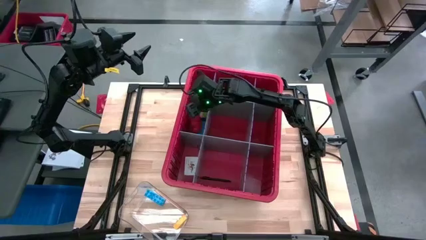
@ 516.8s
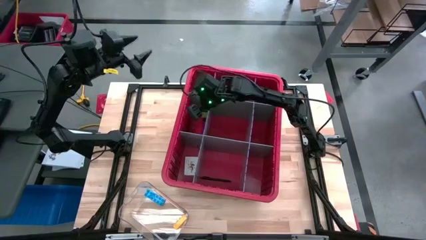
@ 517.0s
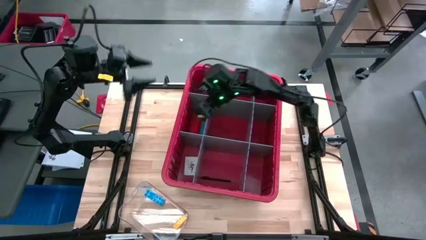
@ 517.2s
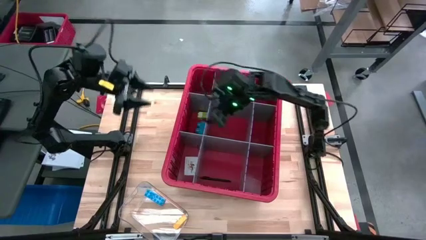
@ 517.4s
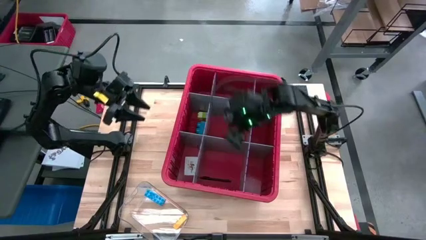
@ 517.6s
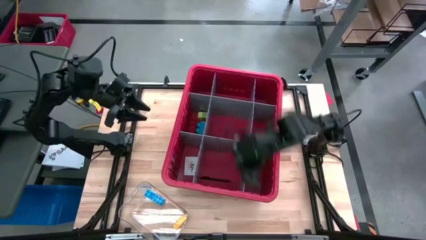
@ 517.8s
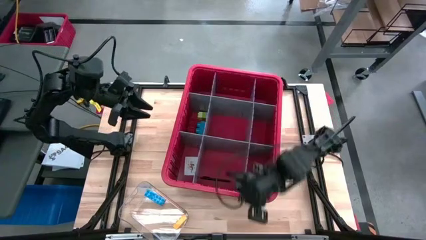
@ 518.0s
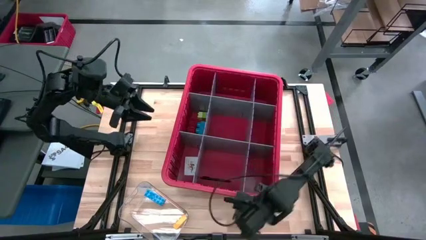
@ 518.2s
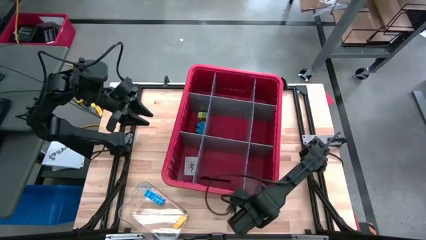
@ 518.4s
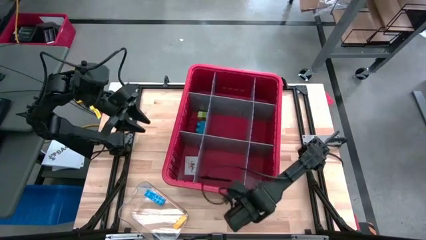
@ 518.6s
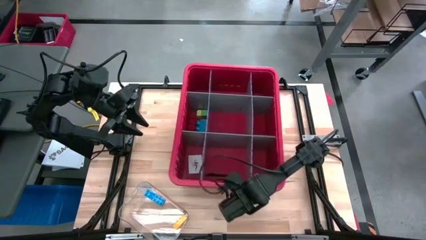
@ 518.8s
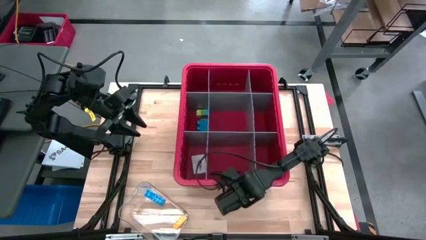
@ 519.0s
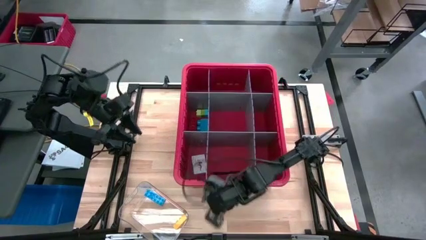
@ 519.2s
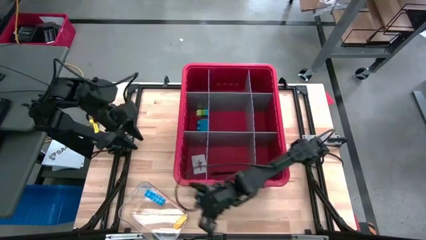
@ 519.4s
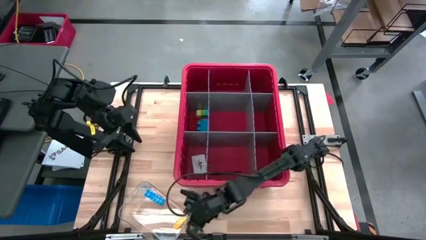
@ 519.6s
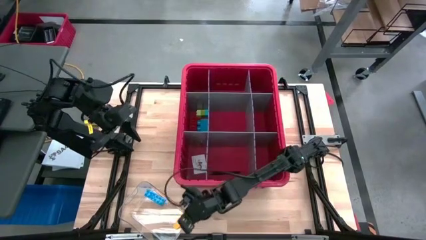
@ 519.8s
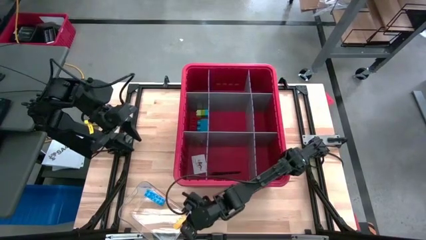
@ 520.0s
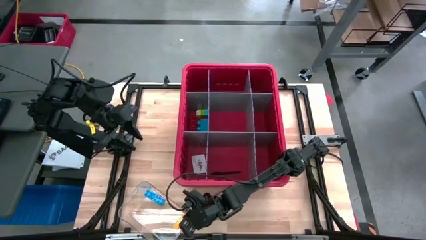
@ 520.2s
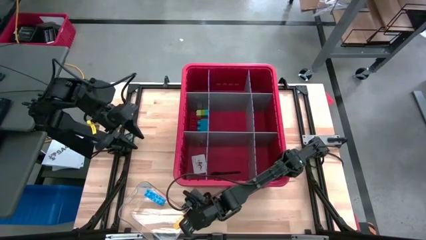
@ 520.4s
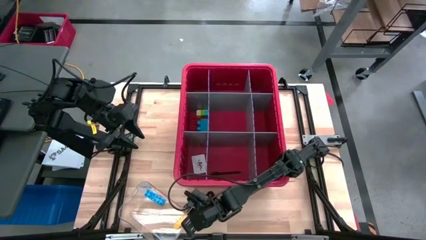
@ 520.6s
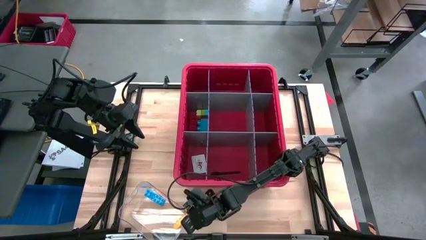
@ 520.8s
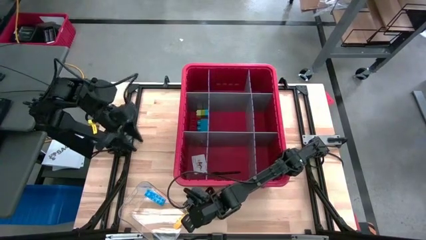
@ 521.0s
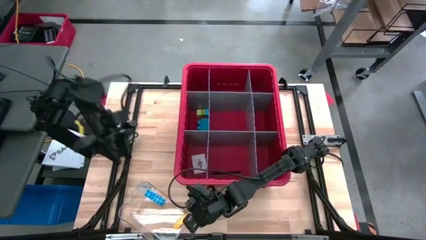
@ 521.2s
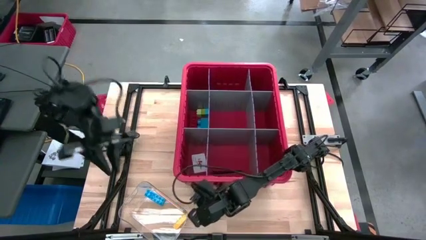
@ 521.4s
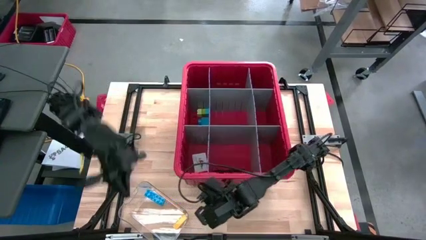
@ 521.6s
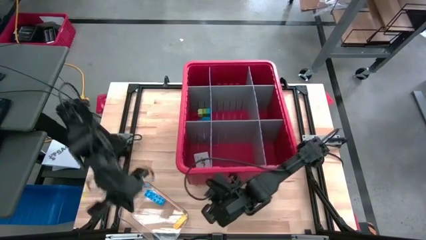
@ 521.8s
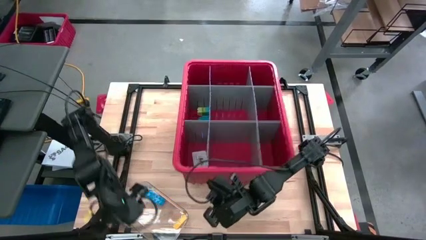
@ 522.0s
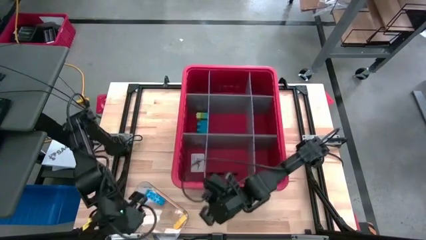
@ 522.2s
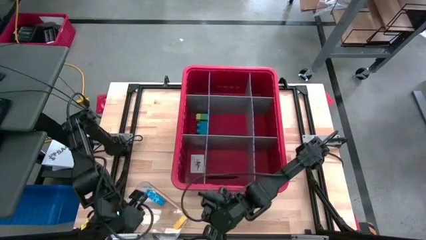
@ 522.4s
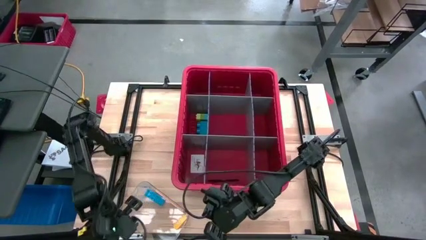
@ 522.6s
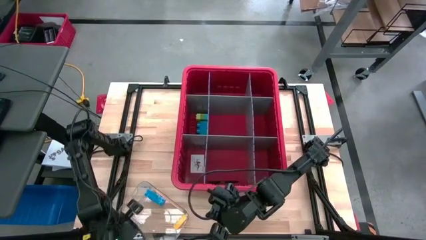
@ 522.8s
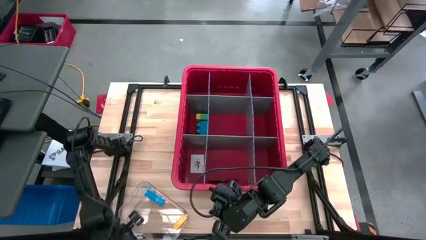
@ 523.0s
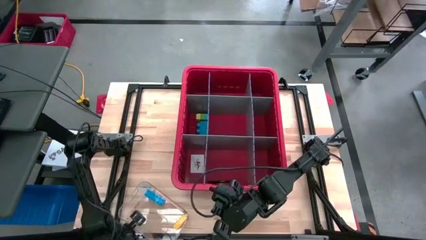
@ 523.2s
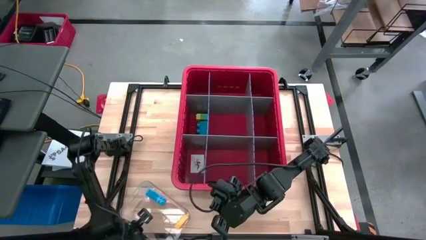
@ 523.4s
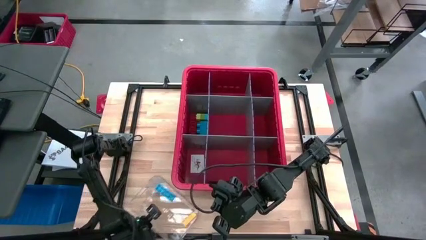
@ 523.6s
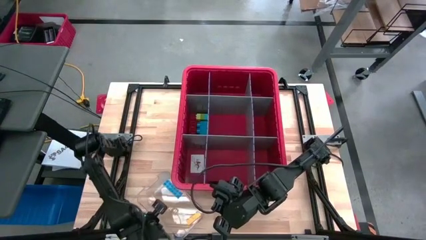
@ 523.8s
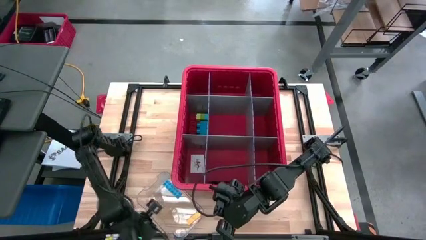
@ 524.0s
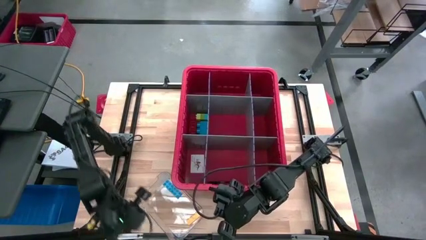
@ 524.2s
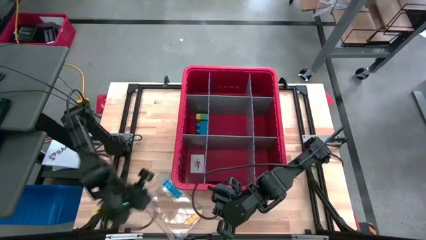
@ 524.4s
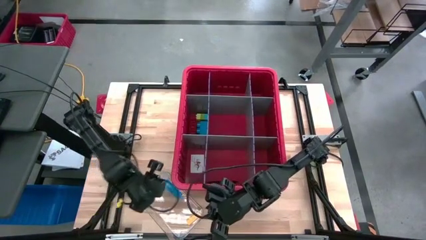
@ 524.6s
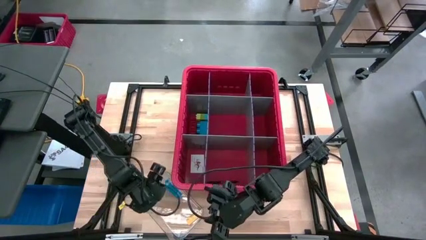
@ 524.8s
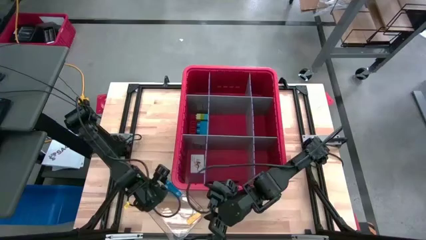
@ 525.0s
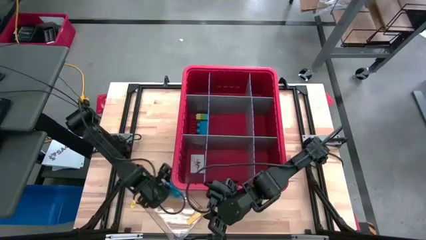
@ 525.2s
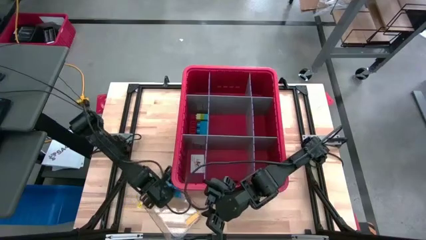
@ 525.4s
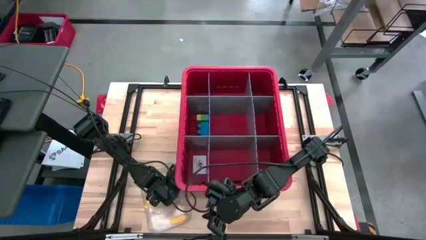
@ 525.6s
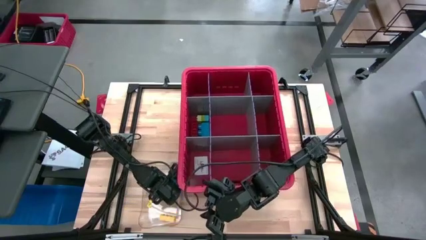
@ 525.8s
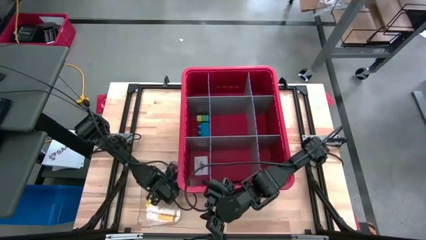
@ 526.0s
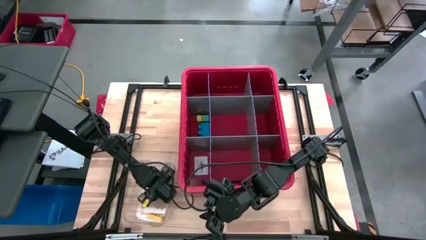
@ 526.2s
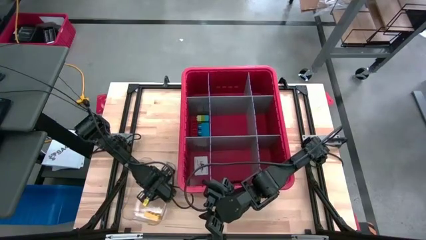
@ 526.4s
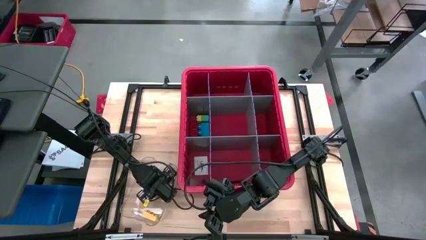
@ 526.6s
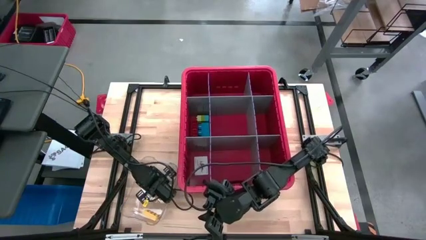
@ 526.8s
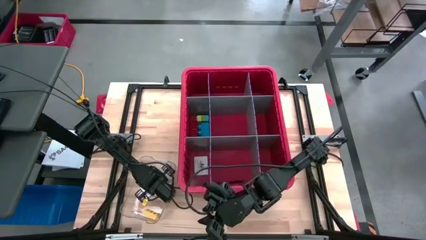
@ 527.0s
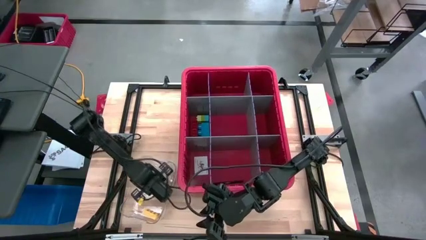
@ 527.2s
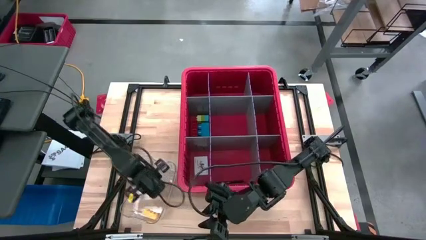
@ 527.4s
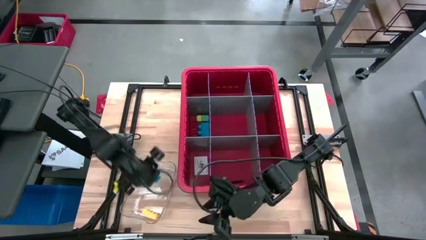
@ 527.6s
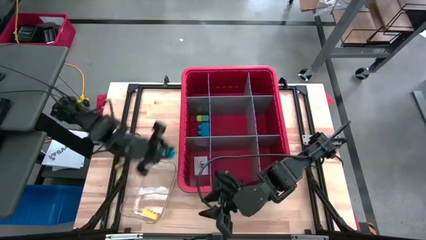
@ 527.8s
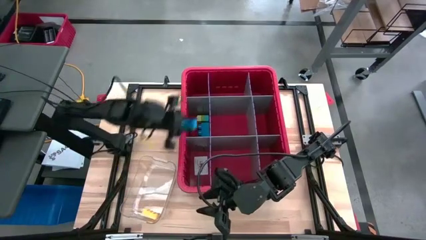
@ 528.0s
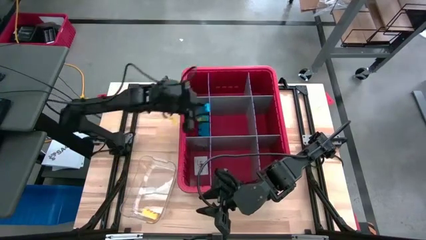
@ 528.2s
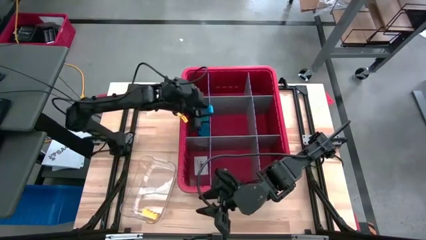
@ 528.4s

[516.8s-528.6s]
Task: Sort blocks
Put the blue block into the bin

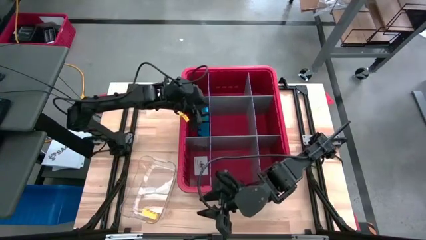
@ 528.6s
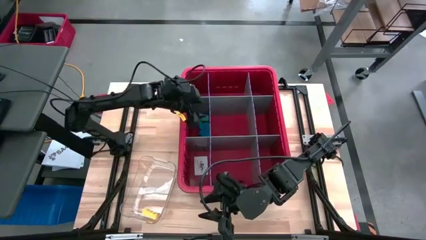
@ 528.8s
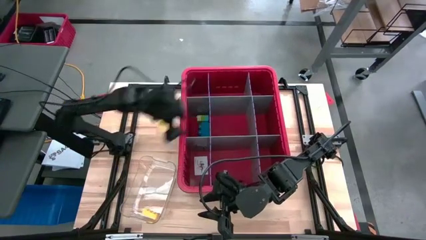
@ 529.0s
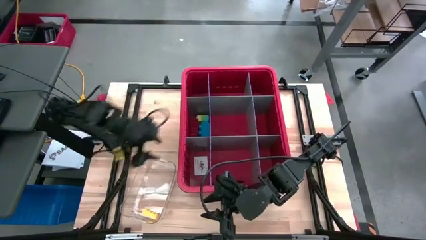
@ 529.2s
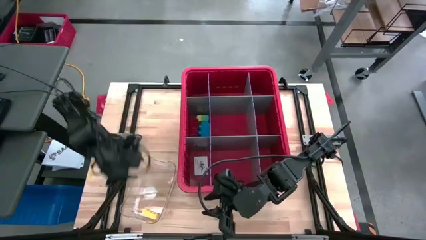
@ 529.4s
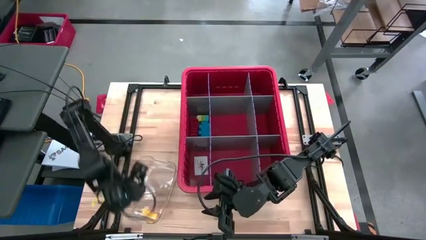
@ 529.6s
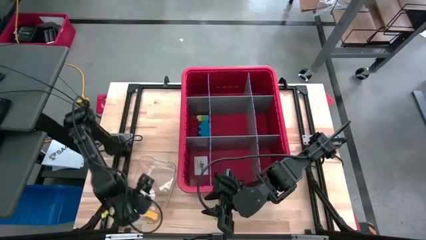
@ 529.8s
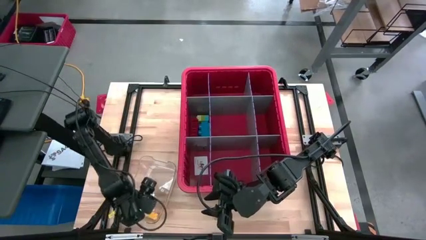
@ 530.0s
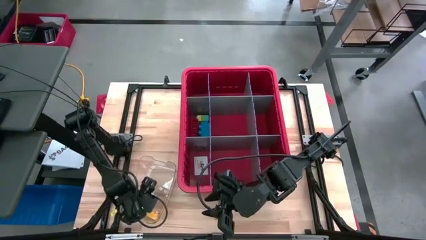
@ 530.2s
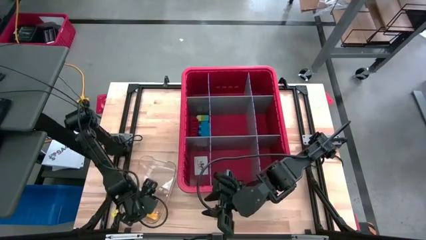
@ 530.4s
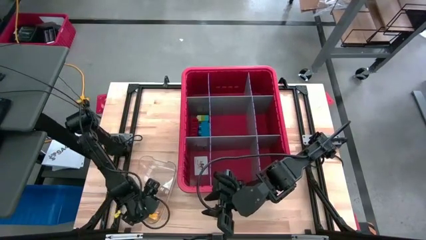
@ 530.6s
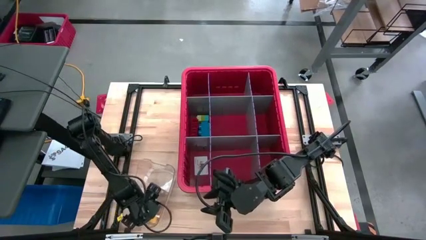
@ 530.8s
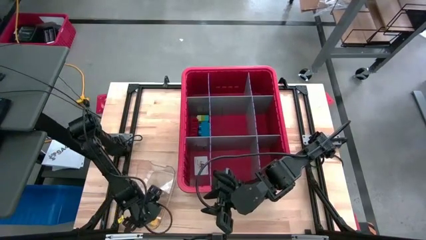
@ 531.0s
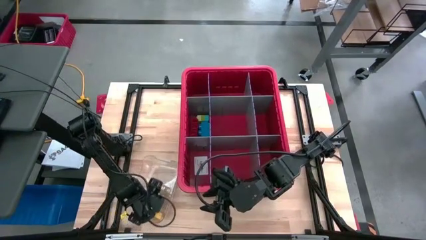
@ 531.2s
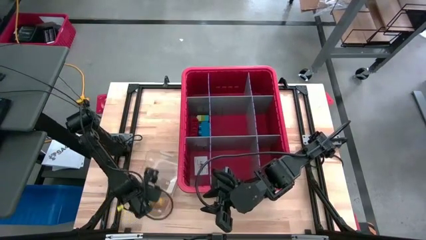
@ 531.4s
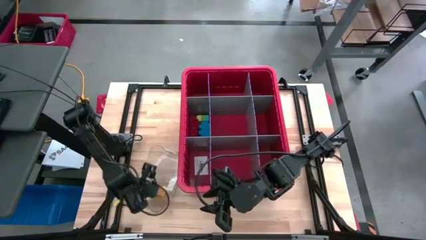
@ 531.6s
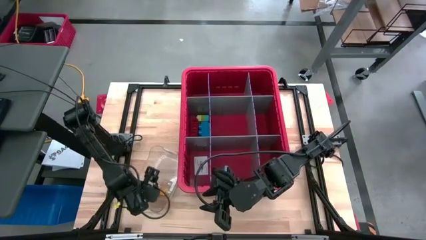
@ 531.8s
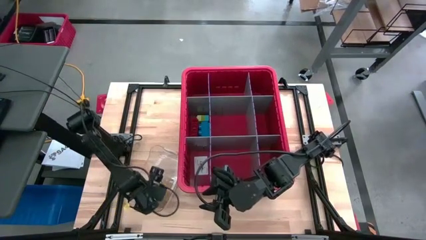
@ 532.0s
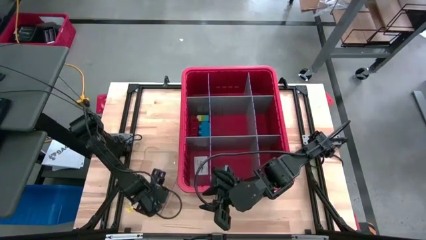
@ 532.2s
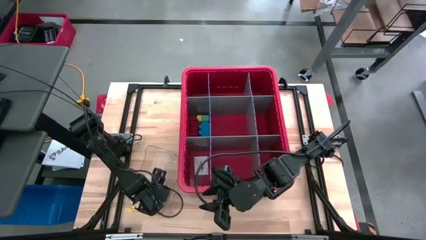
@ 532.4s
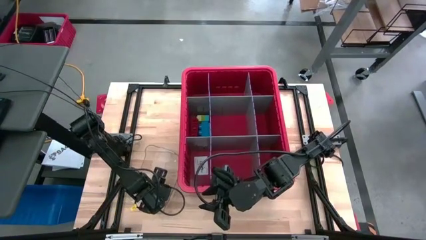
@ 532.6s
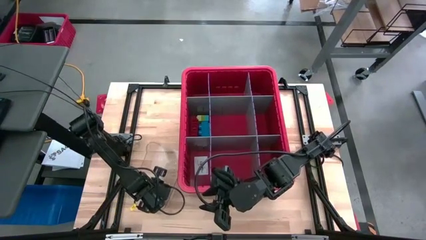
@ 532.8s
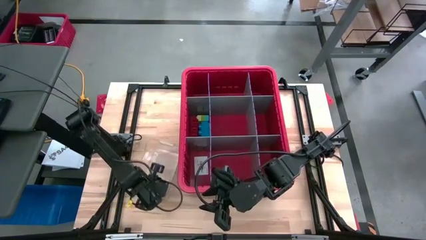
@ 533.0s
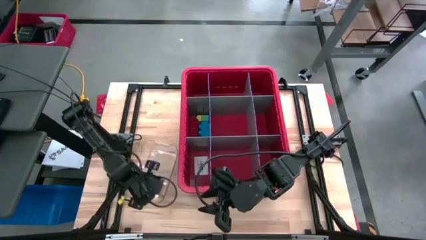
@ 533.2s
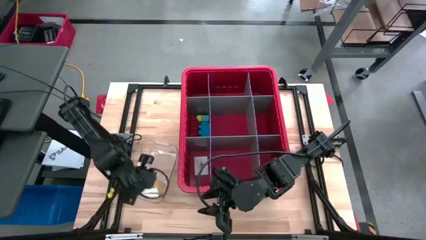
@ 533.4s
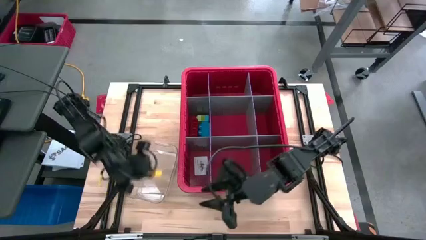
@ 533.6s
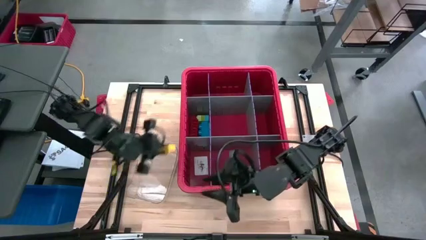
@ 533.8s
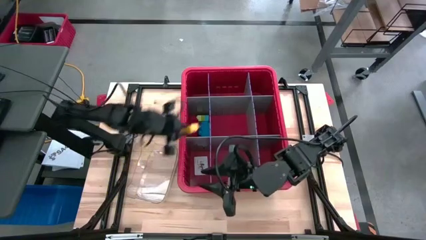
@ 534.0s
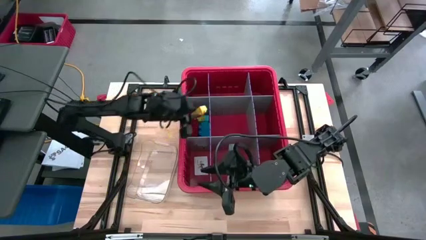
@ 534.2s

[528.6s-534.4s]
Put the yellow block into the bin
